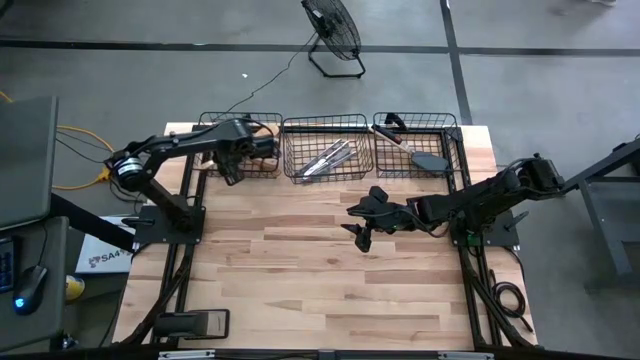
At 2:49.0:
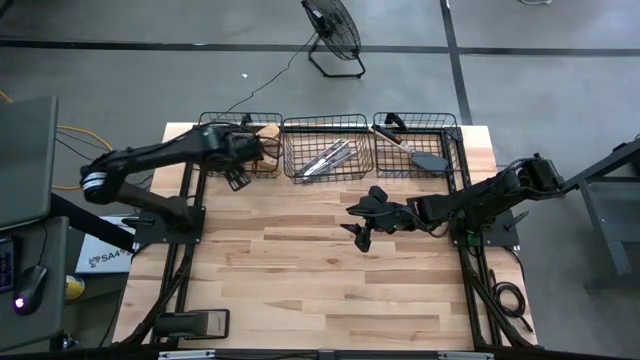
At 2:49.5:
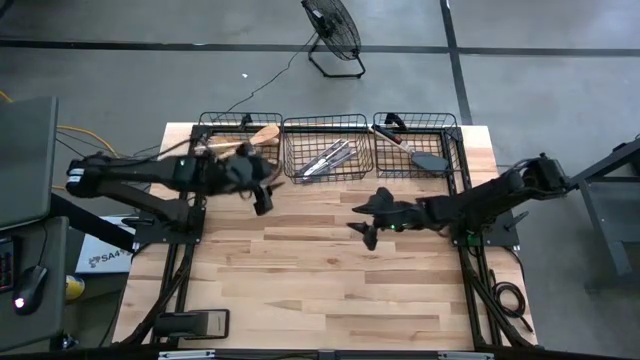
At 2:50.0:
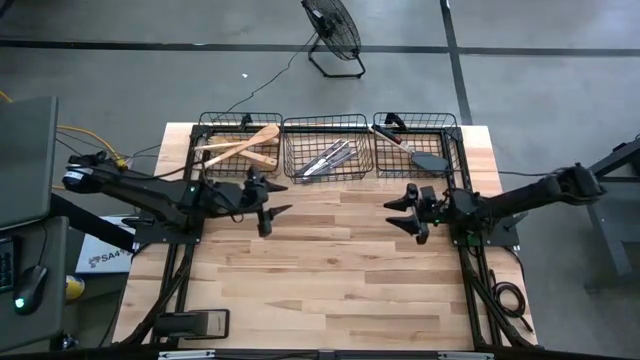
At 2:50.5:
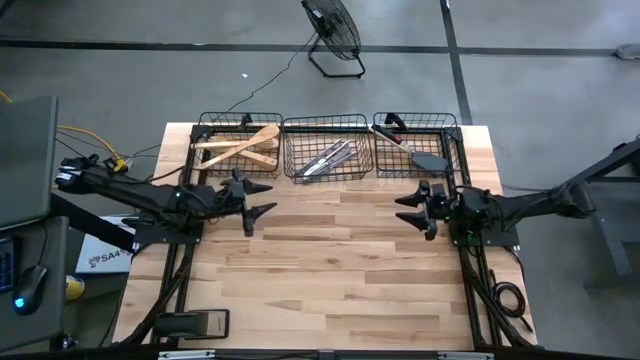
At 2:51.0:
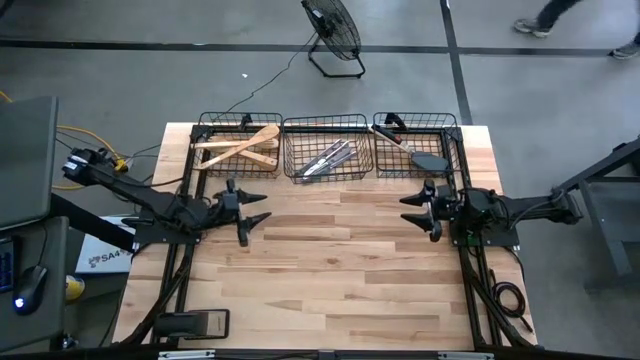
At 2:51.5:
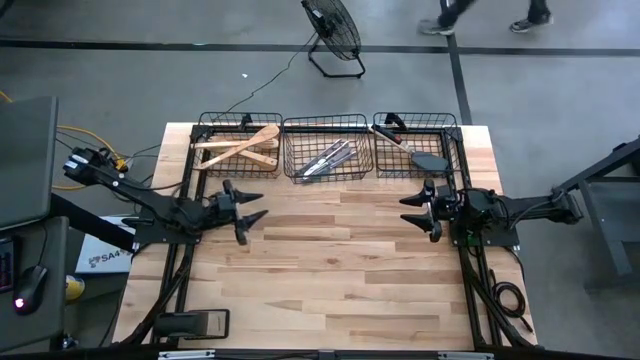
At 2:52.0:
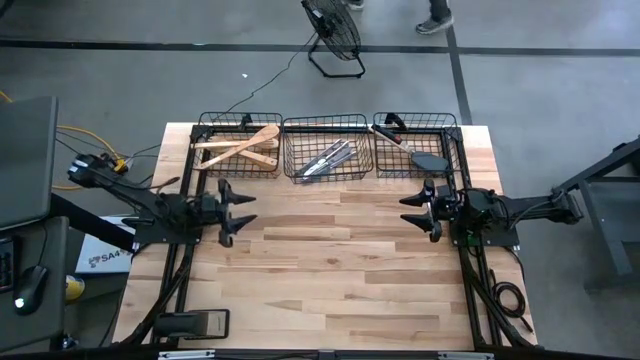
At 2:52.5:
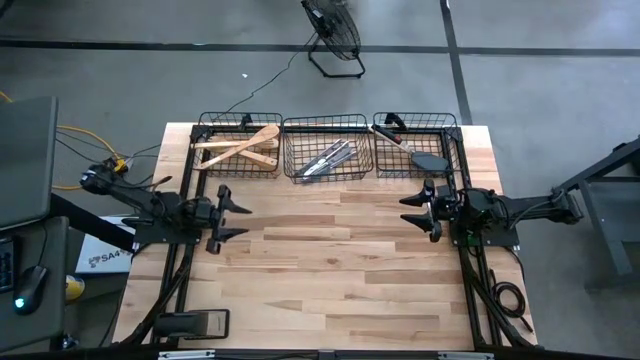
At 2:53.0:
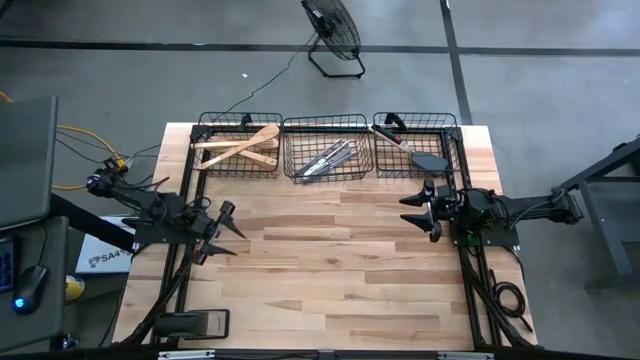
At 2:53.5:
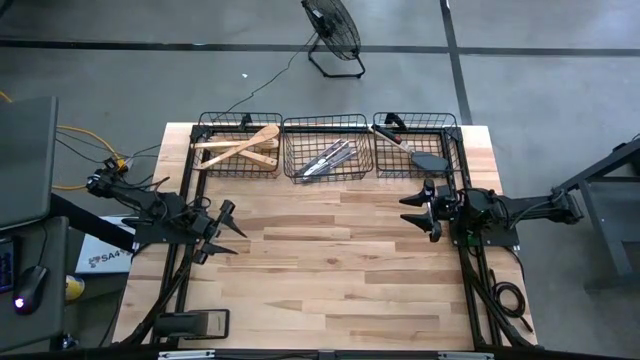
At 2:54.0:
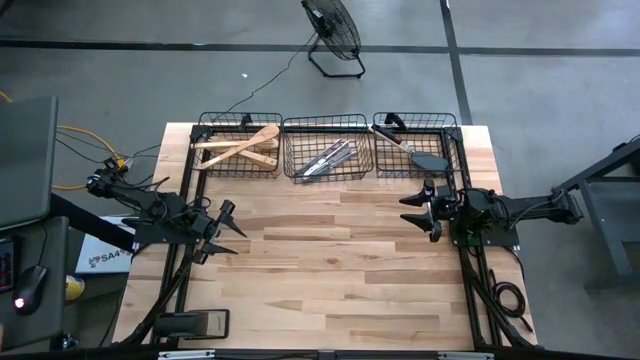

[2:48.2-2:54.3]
Task: Pick & Place Kitchen Items
Return to Home Position

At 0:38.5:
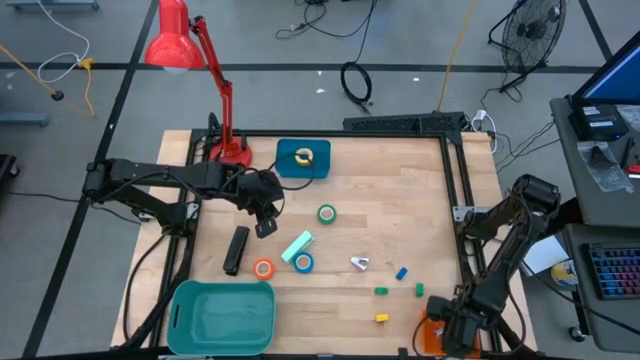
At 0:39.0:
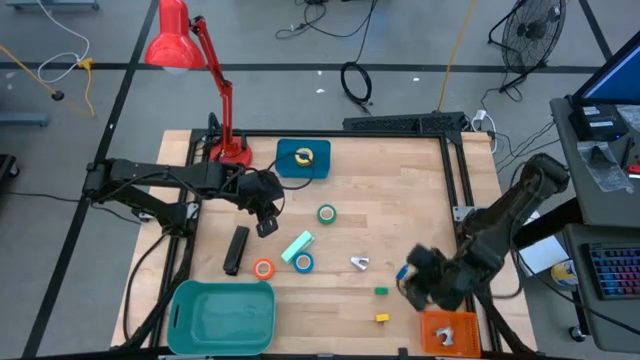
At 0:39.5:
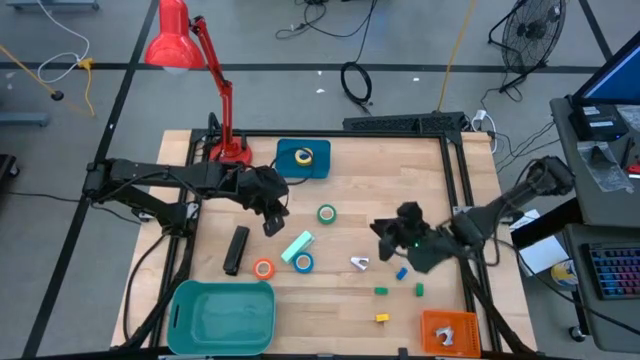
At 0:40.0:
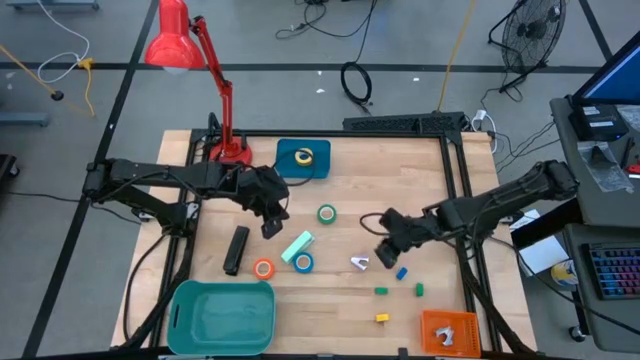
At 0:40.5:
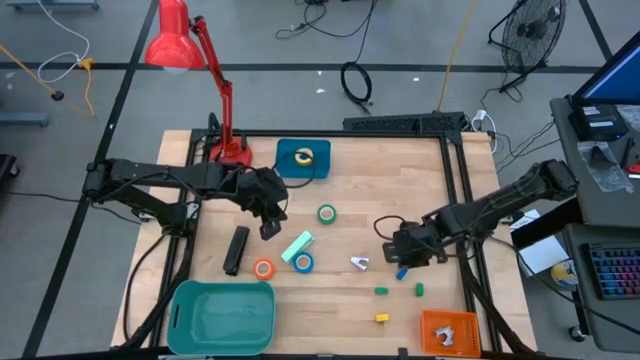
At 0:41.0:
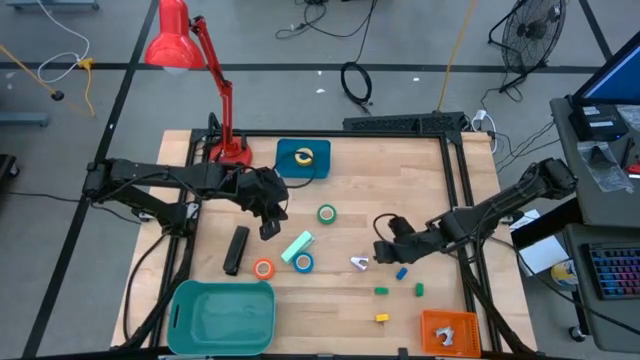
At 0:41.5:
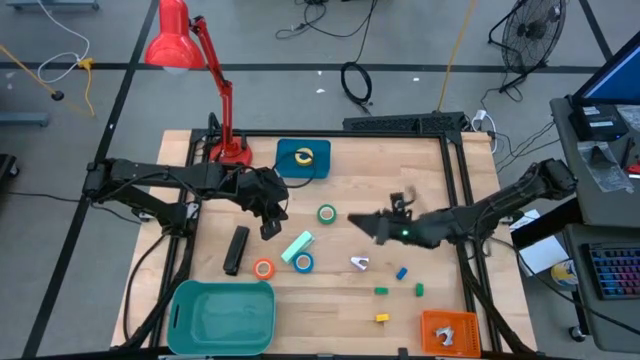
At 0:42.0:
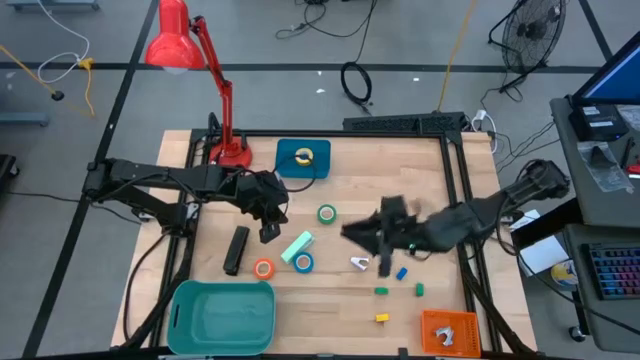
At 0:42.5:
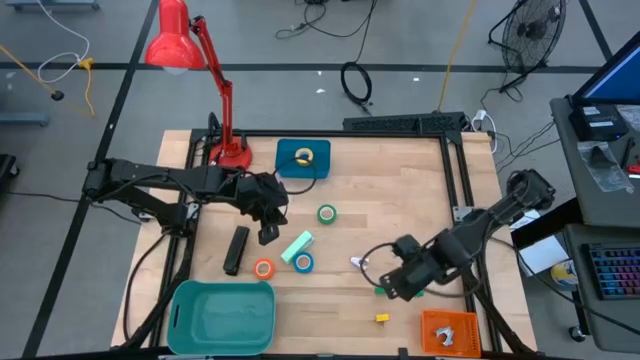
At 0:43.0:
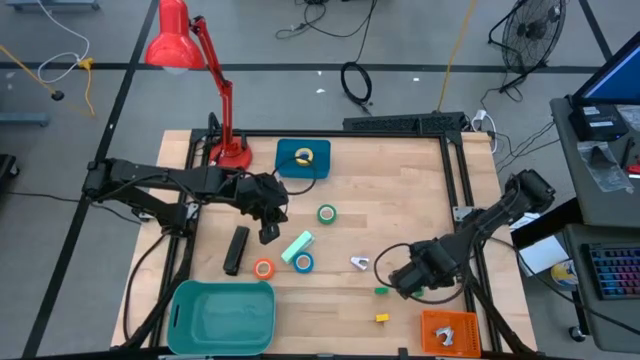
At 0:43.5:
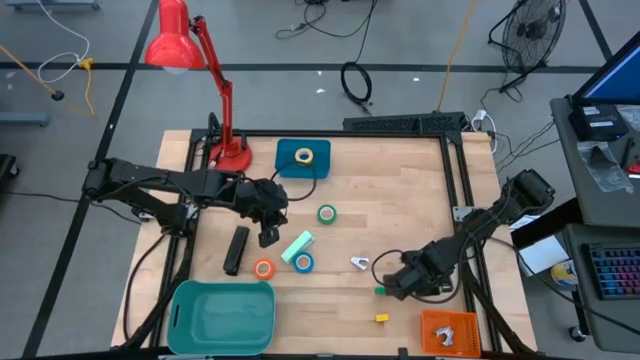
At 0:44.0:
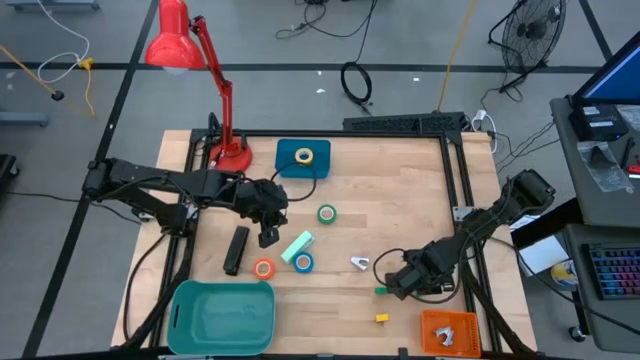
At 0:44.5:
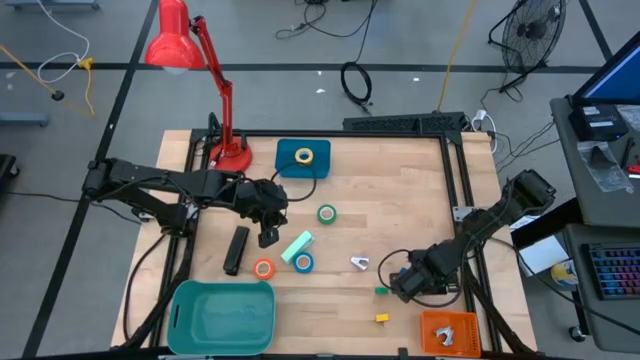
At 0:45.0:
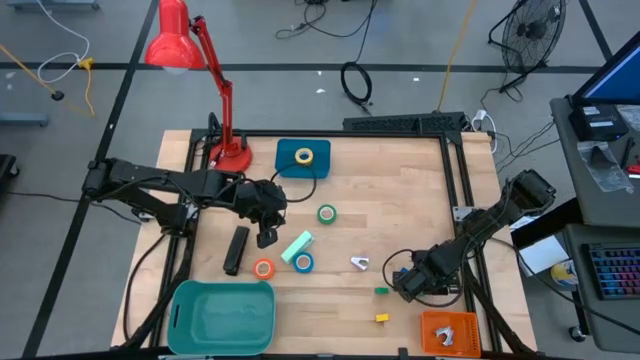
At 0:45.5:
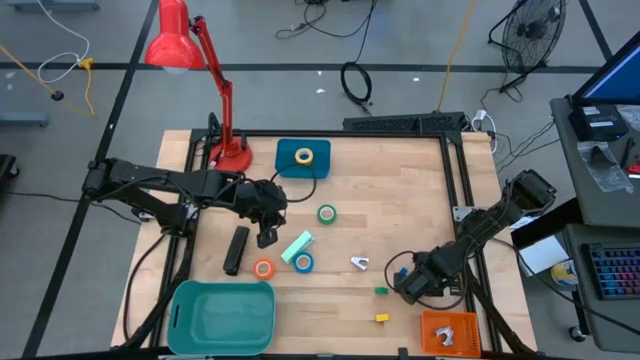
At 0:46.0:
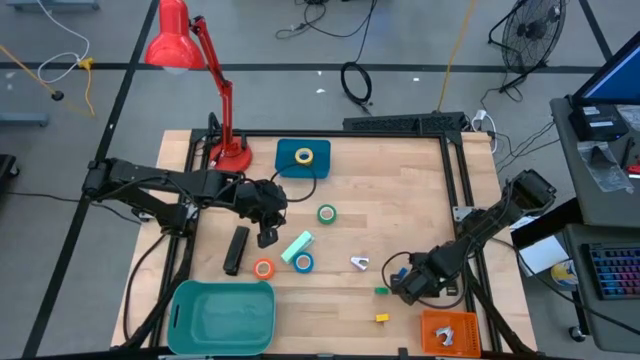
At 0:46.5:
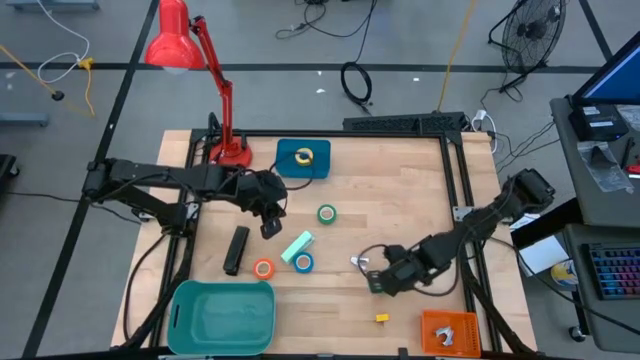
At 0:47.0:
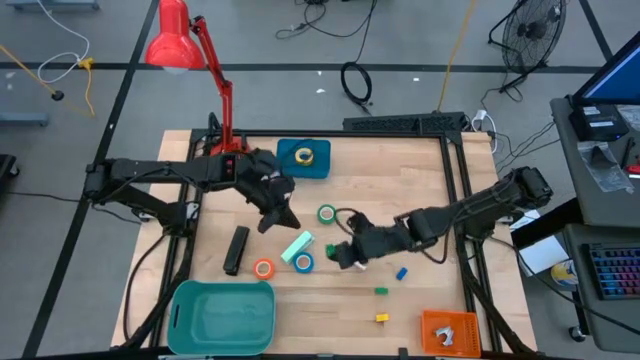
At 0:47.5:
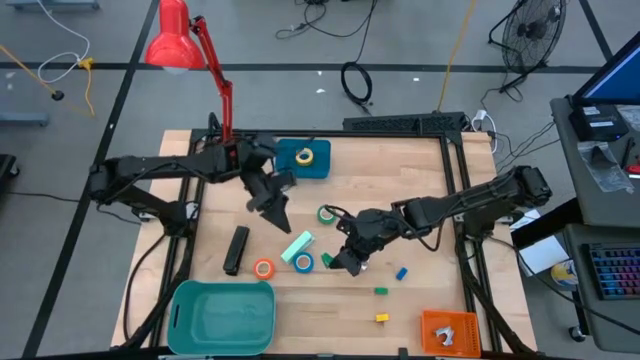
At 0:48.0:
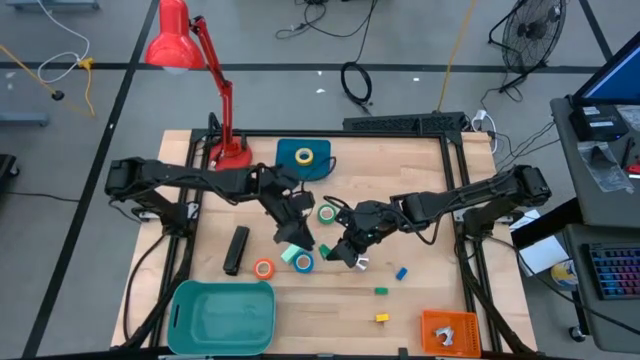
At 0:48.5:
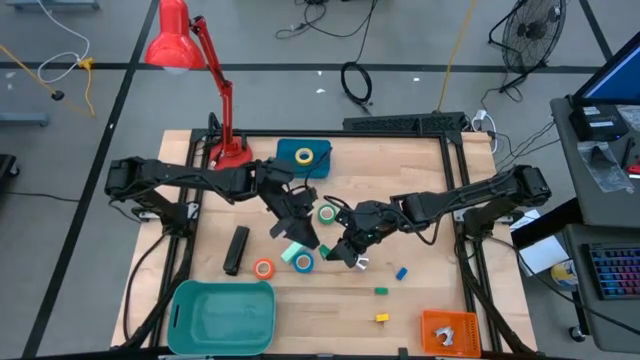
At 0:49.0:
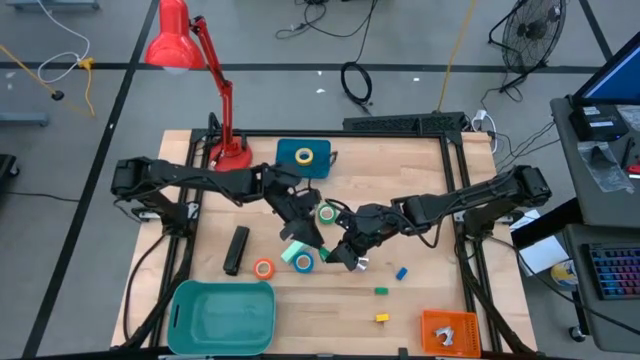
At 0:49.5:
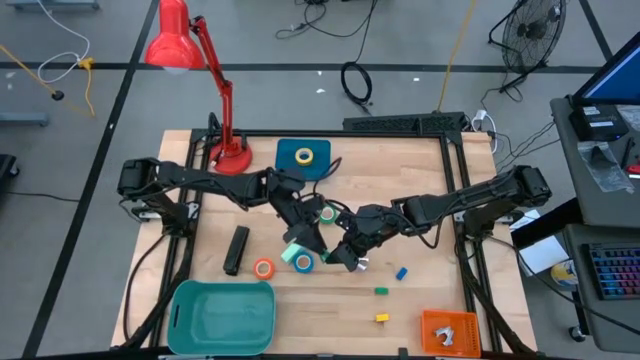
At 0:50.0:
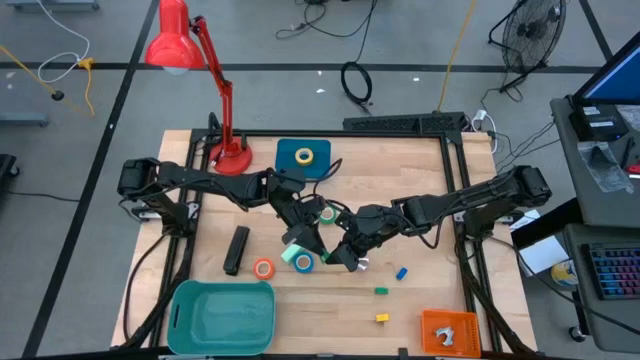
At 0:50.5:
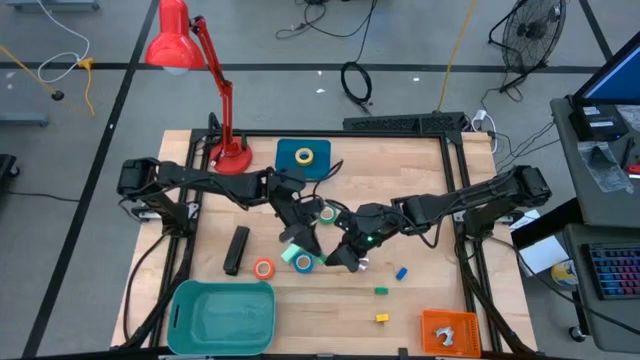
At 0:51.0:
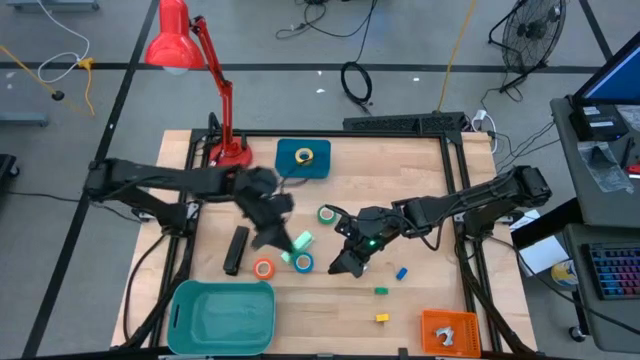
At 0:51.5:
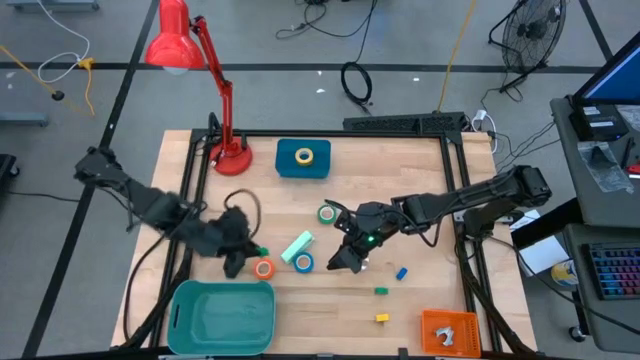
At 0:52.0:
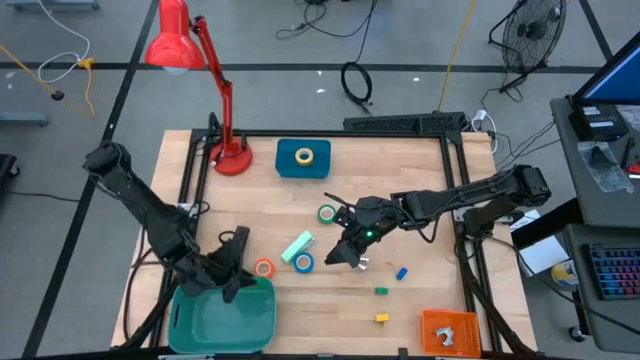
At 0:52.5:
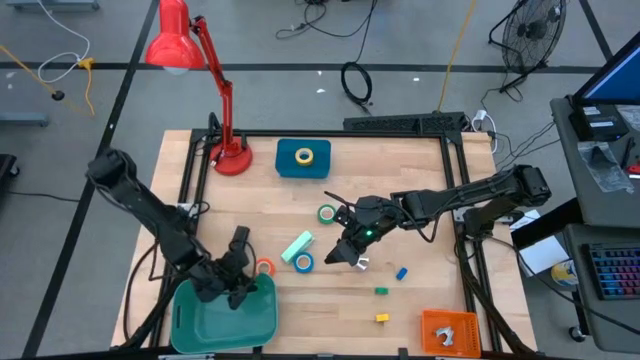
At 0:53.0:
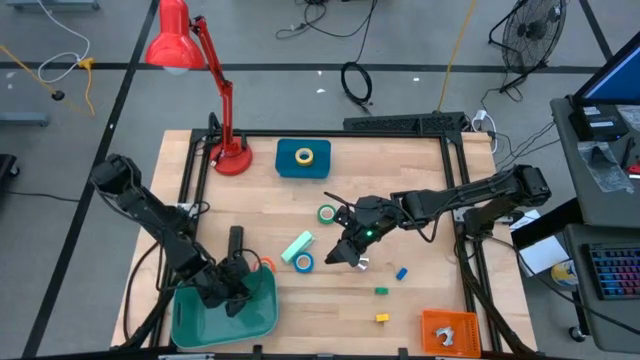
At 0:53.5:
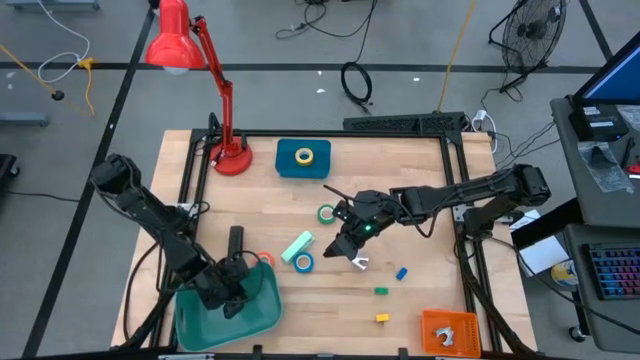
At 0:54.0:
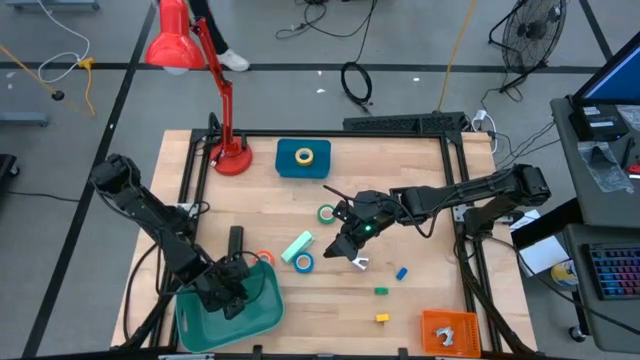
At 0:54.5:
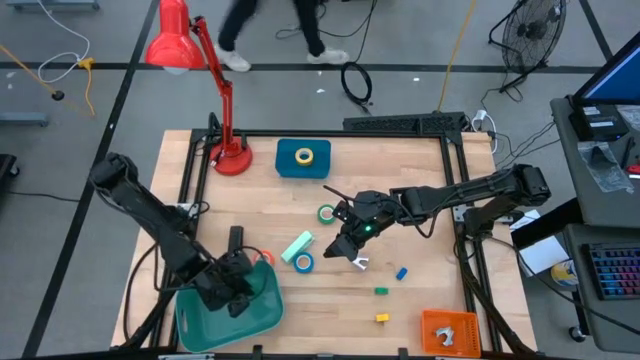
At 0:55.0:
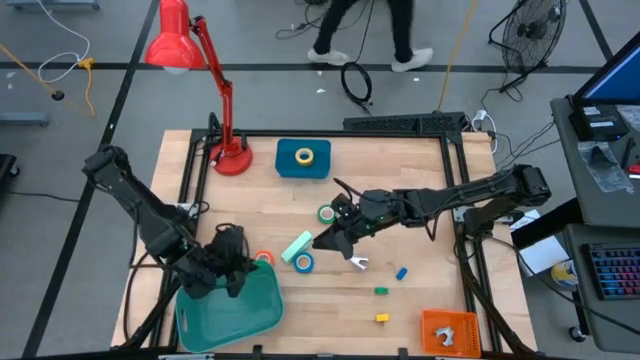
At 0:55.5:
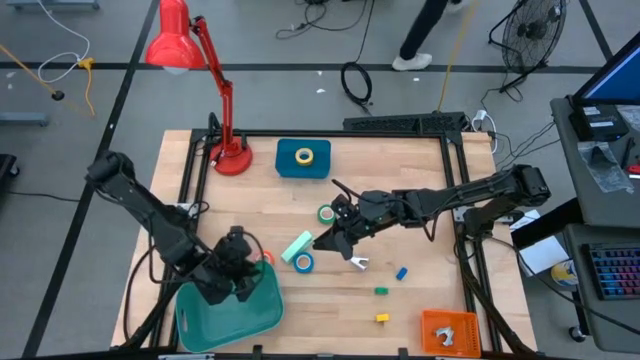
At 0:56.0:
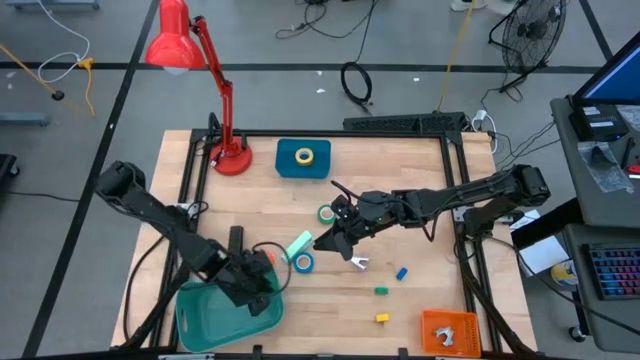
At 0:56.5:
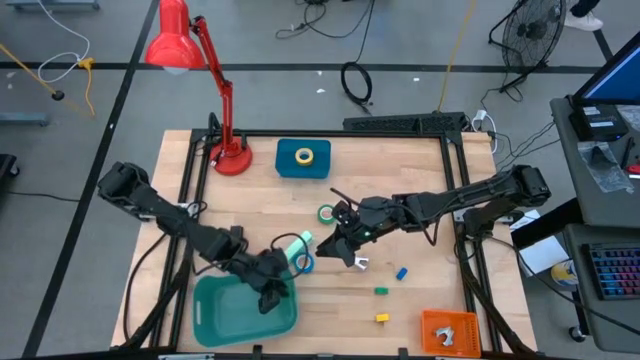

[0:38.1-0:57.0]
Task: Pick and place Stapler, Stapler remover, tape
Put the right green stapler into the green bin
